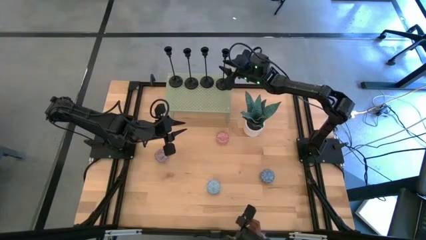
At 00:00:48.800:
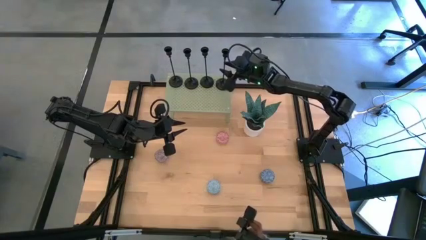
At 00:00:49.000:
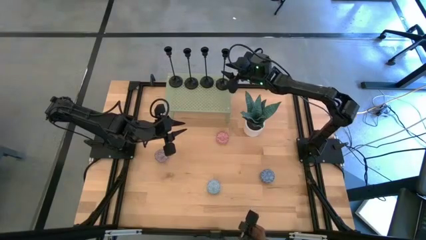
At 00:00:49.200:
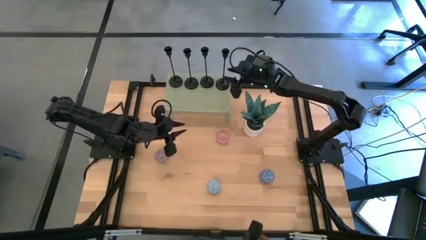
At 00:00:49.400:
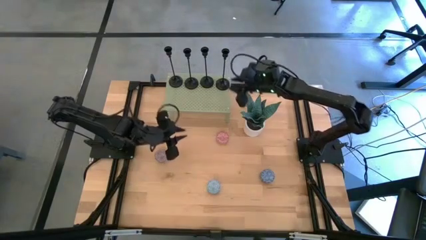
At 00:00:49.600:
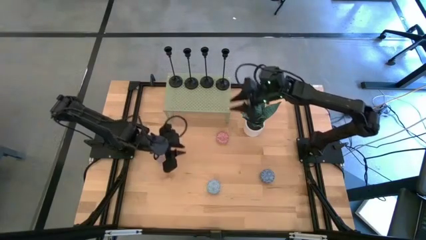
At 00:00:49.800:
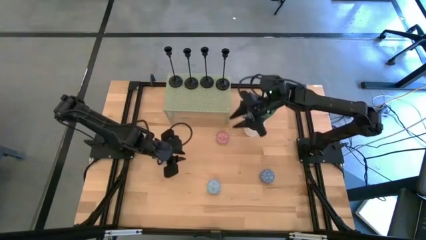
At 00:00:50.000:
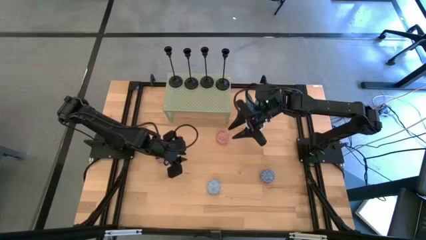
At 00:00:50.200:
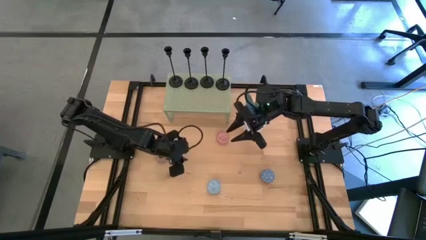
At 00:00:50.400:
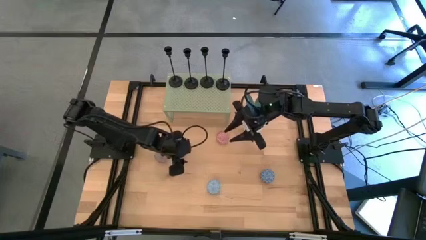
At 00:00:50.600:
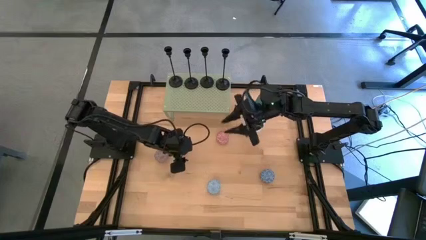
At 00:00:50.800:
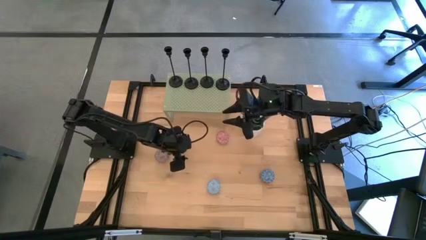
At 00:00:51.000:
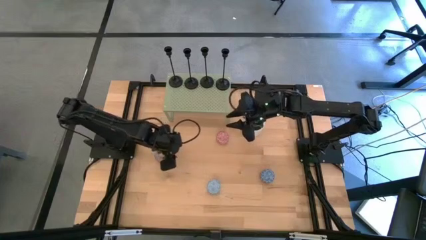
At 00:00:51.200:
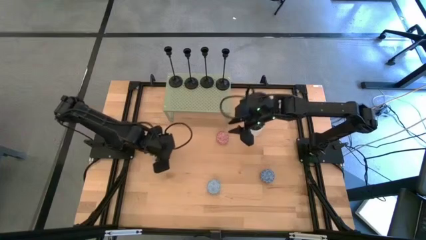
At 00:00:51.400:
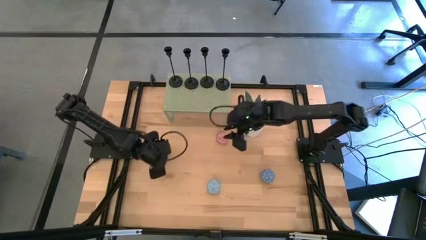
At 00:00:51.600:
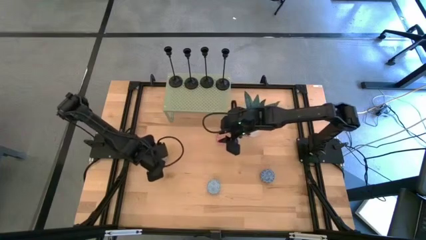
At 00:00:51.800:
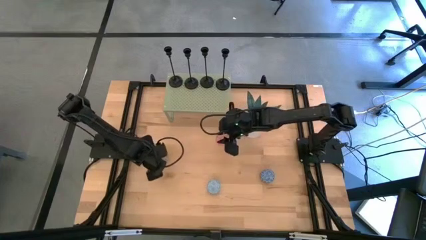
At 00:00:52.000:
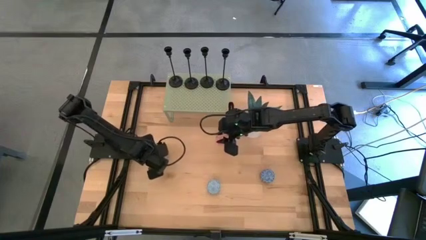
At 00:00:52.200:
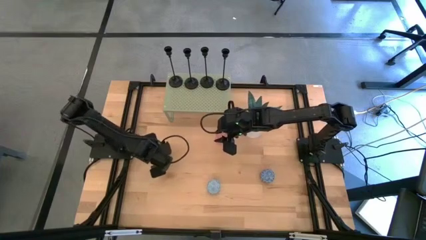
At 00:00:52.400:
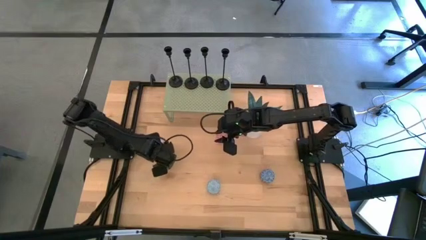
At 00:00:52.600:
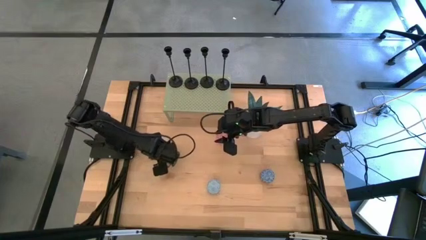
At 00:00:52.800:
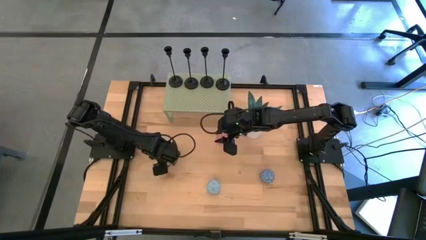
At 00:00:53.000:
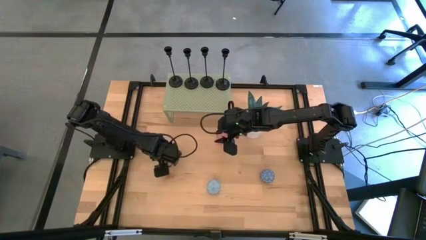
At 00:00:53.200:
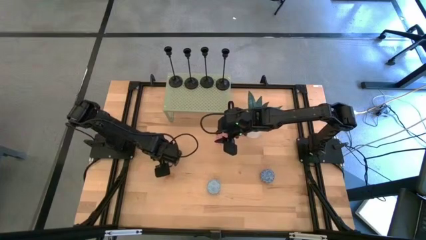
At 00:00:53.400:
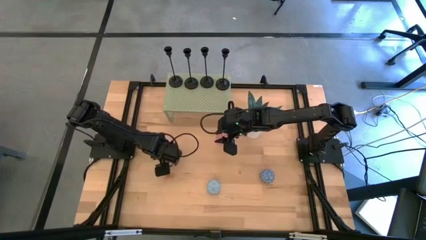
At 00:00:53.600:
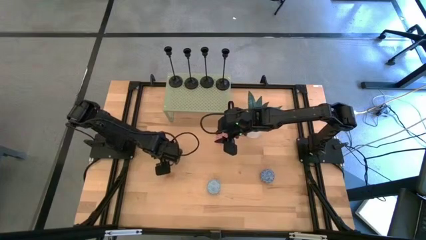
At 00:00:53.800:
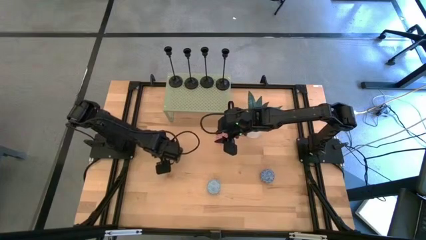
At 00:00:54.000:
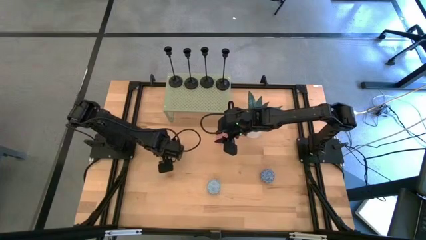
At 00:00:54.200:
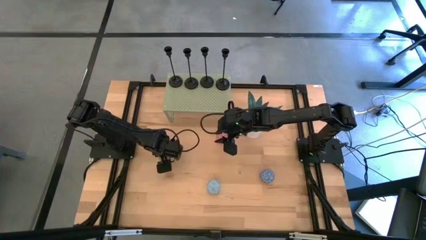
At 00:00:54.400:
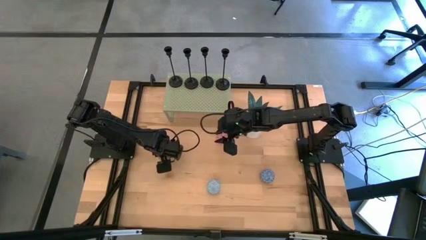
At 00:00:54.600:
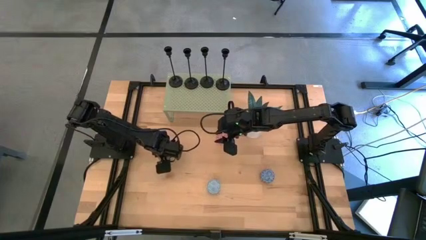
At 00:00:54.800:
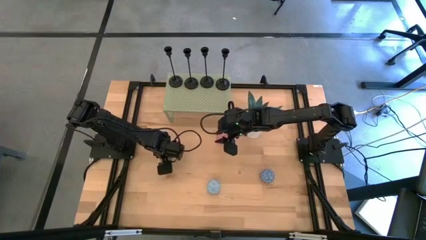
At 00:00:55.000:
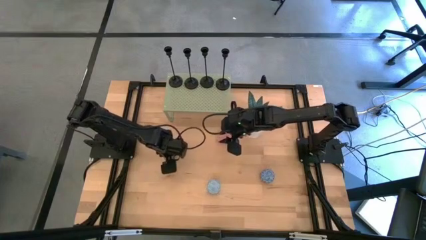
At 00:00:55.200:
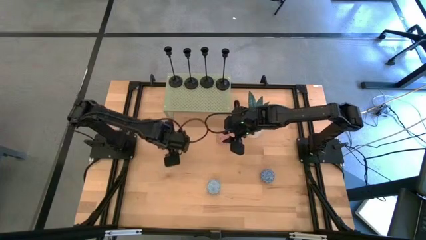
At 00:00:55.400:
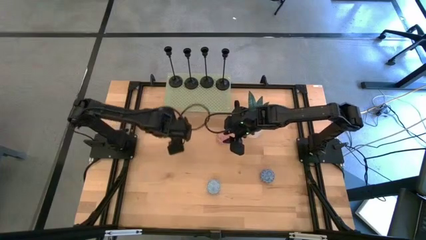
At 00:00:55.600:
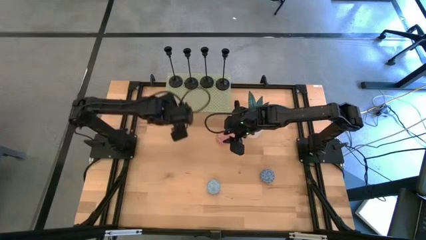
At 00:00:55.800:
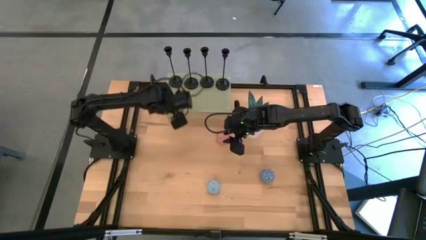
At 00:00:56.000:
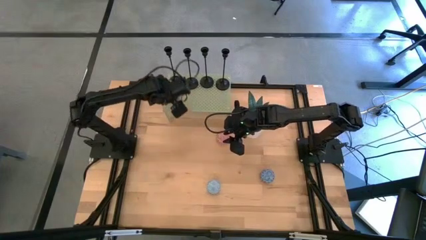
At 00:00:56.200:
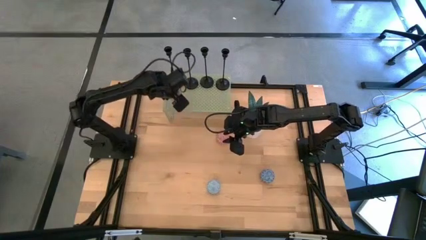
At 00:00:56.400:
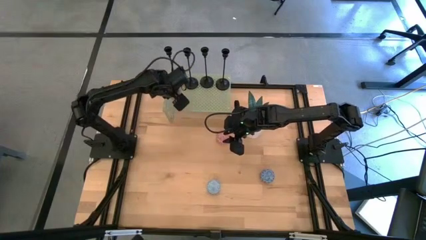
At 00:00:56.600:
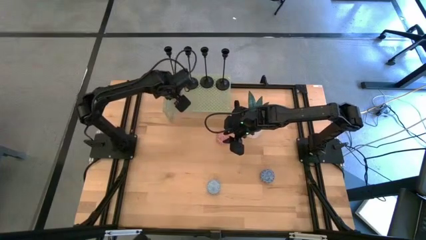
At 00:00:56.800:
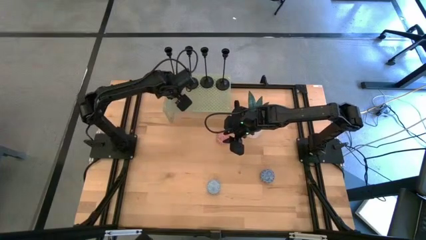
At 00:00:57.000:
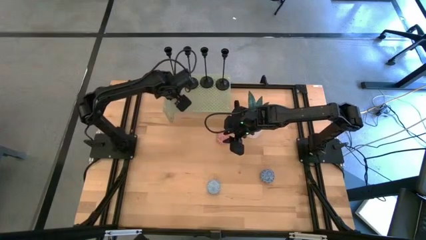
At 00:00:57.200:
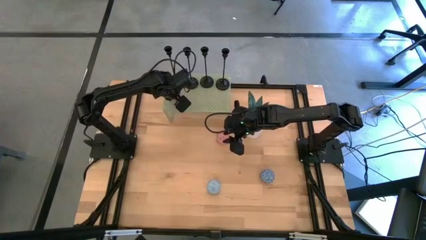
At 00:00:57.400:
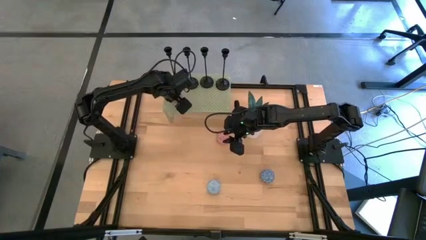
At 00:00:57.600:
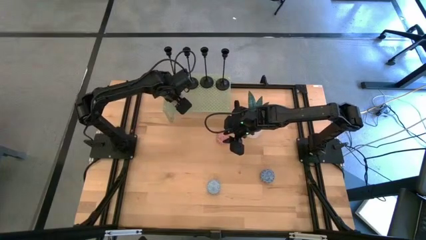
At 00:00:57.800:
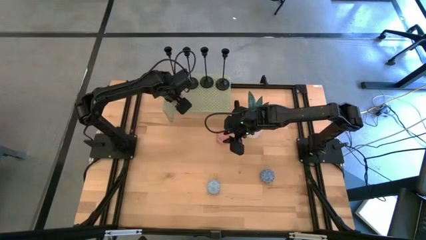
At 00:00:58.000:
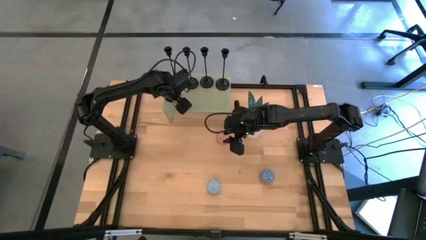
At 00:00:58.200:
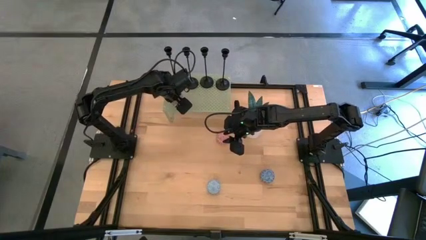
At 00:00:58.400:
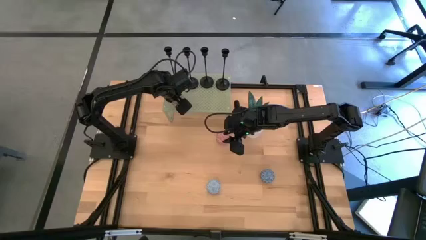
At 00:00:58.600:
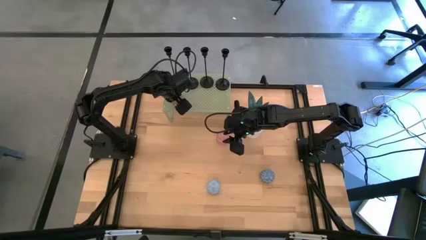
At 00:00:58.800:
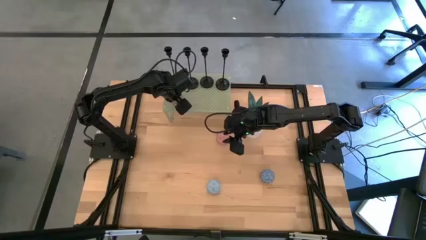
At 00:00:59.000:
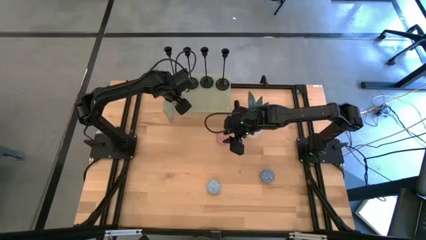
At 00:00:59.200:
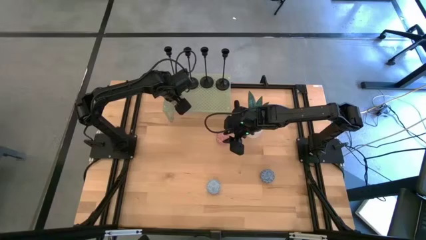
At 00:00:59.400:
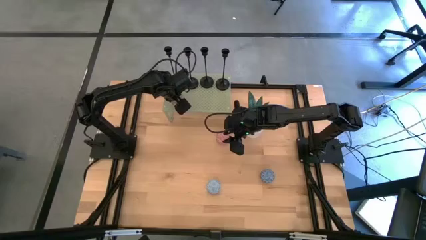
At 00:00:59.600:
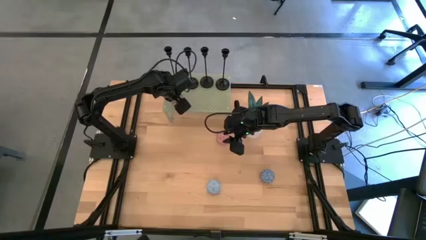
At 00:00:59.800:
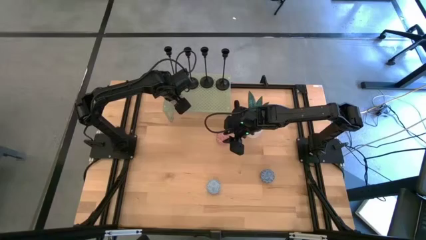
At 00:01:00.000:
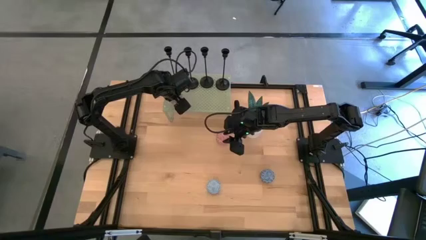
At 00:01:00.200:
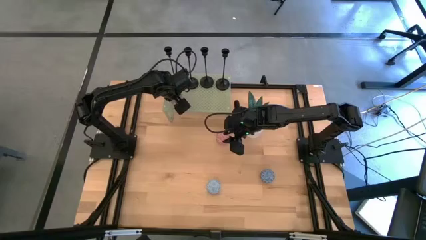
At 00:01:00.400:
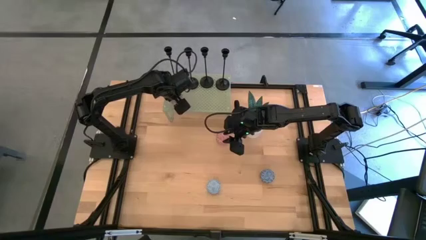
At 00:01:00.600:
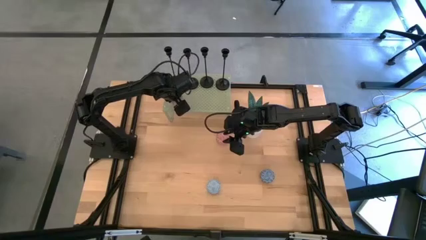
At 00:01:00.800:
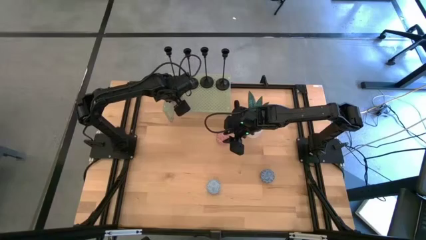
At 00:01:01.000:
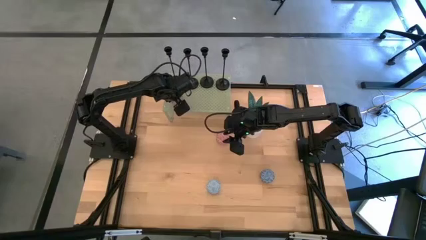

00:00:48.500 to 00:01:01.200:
Task: Pick & Place candle stick holders
Put the purple scented candle on the shelf
